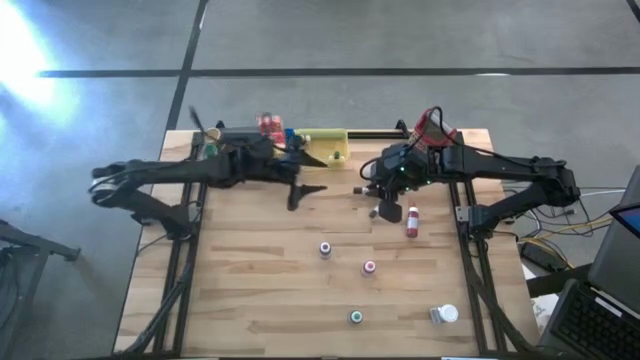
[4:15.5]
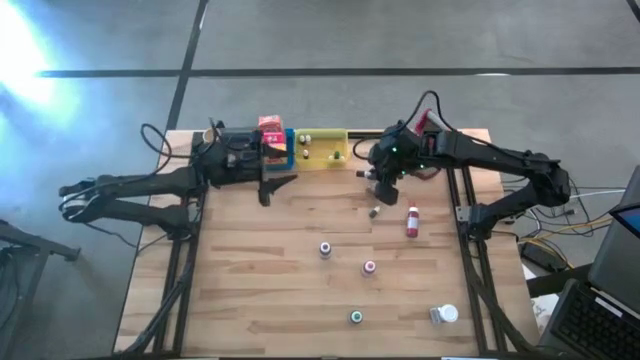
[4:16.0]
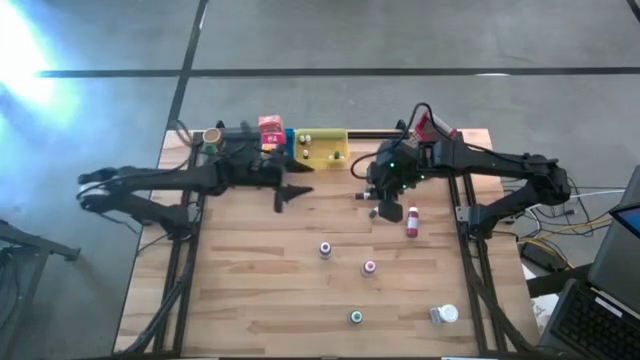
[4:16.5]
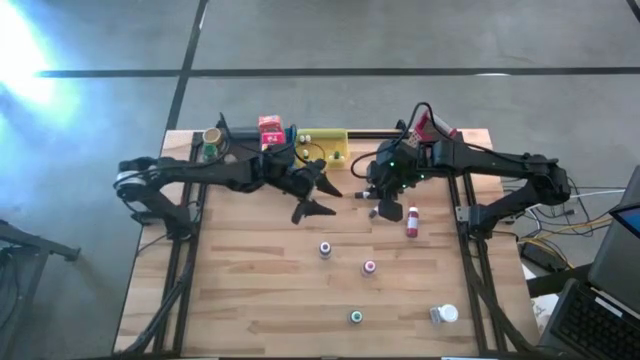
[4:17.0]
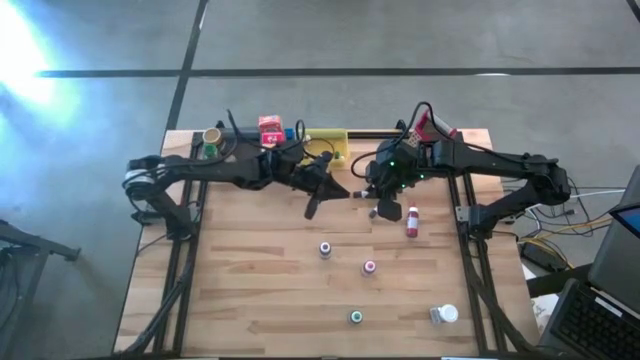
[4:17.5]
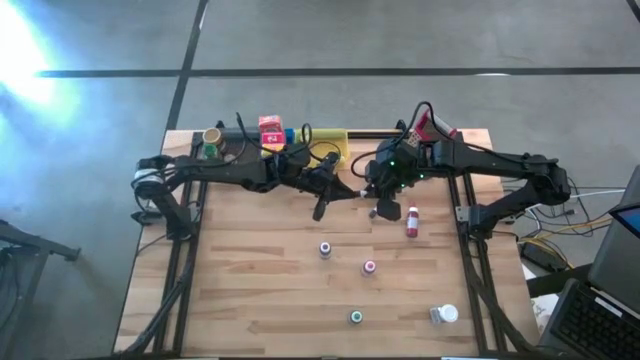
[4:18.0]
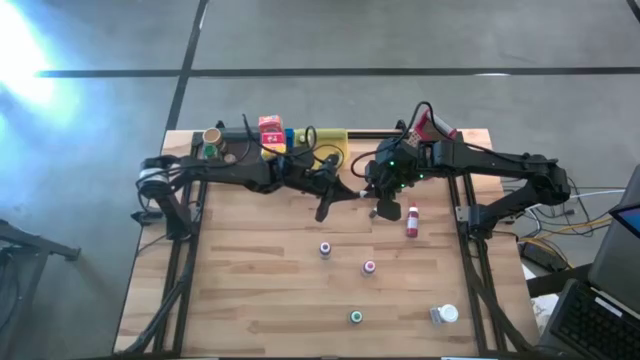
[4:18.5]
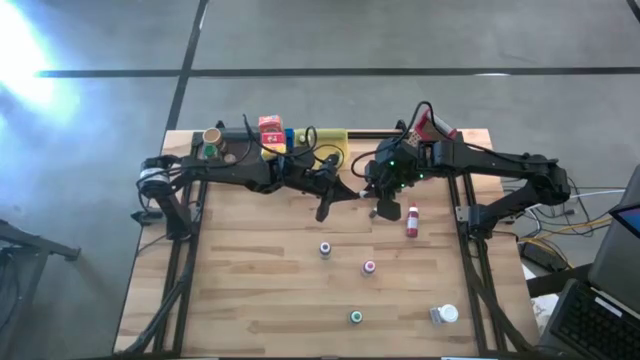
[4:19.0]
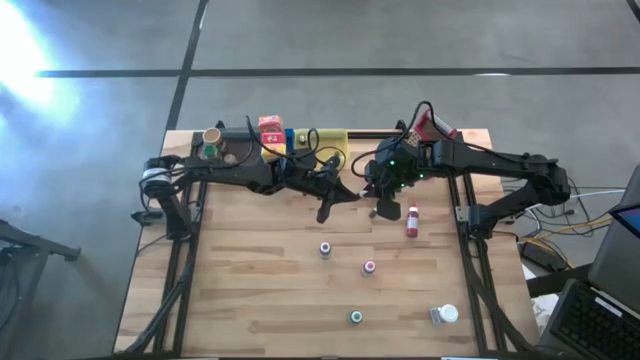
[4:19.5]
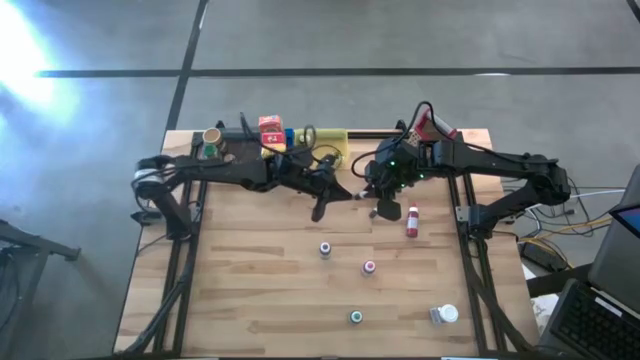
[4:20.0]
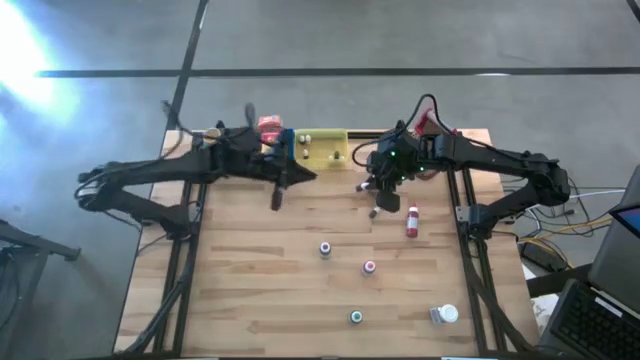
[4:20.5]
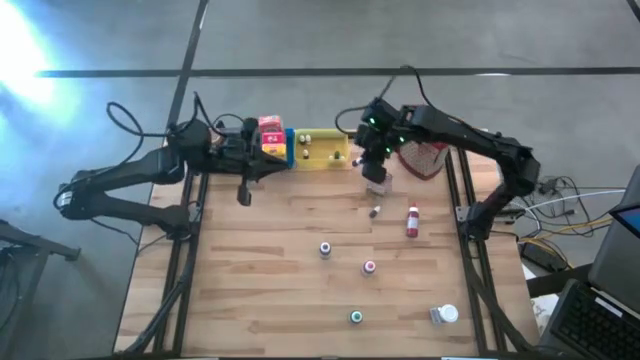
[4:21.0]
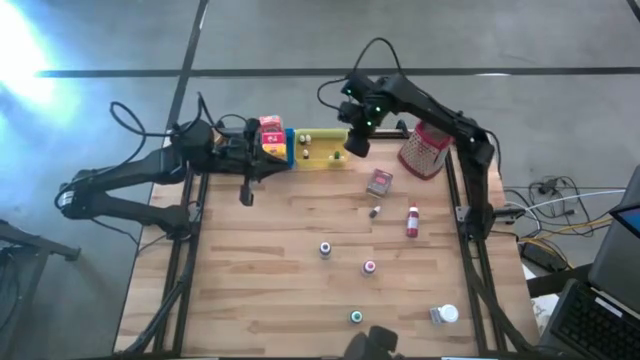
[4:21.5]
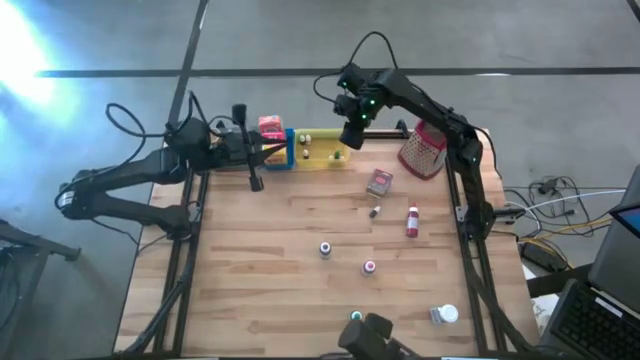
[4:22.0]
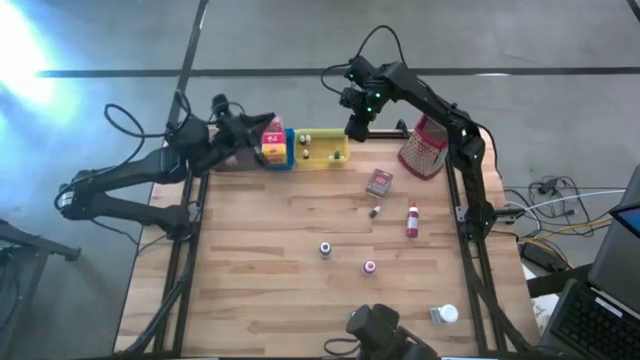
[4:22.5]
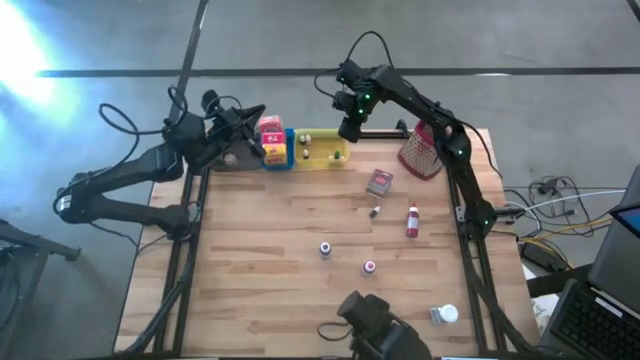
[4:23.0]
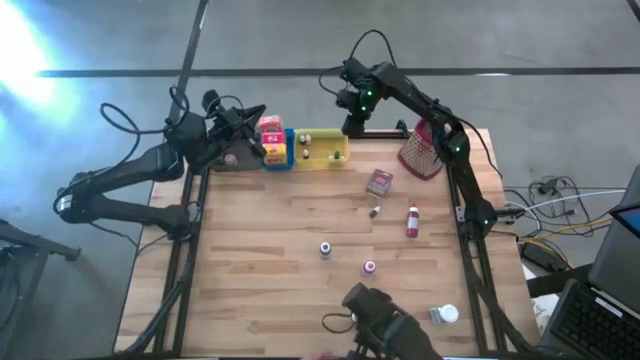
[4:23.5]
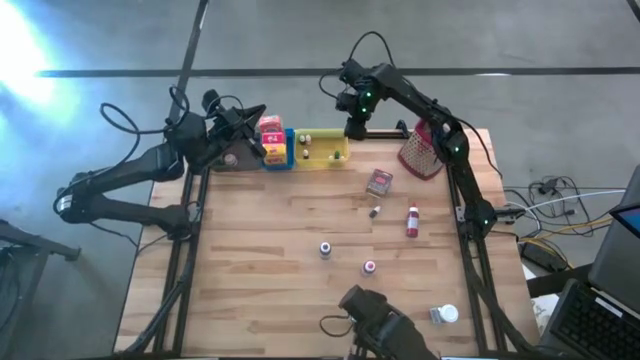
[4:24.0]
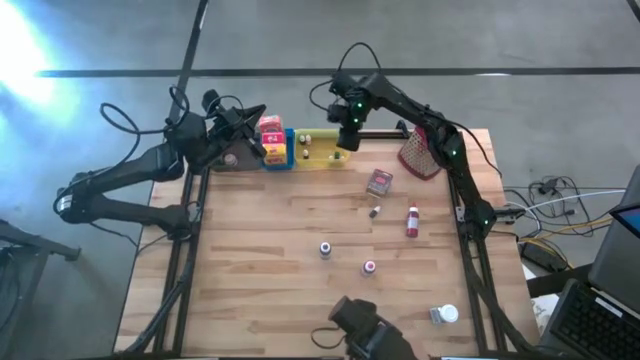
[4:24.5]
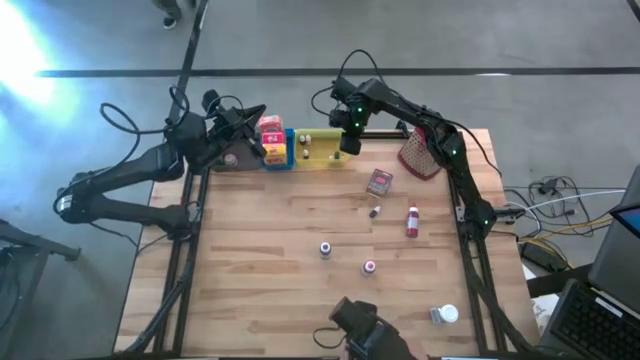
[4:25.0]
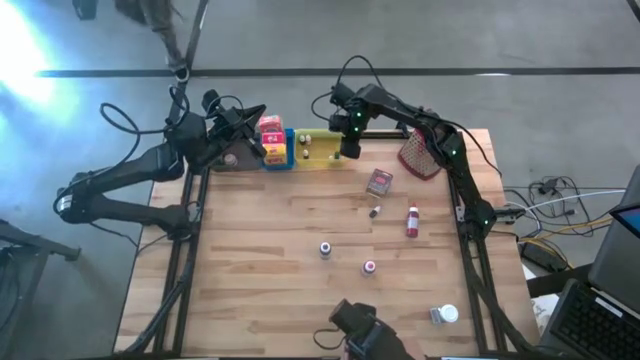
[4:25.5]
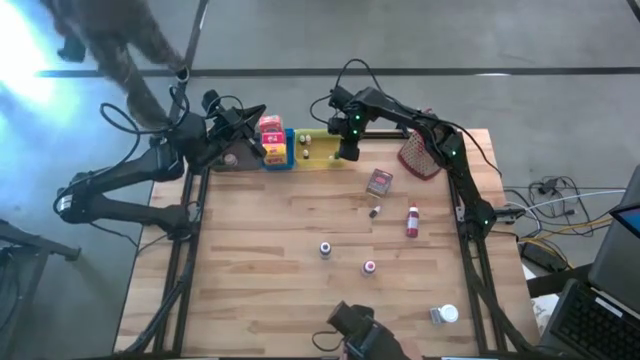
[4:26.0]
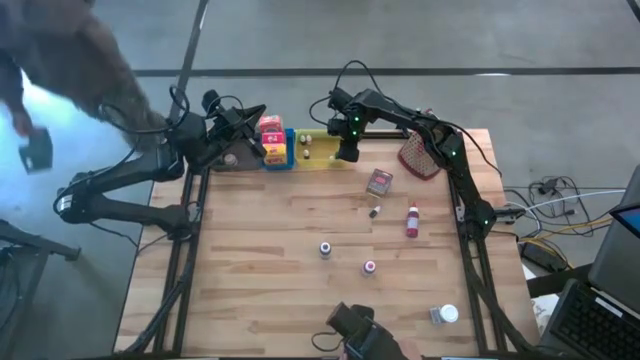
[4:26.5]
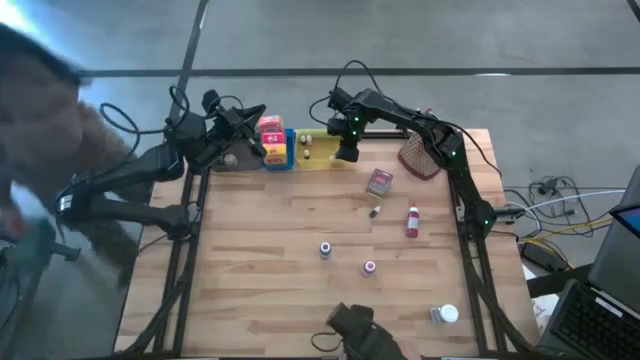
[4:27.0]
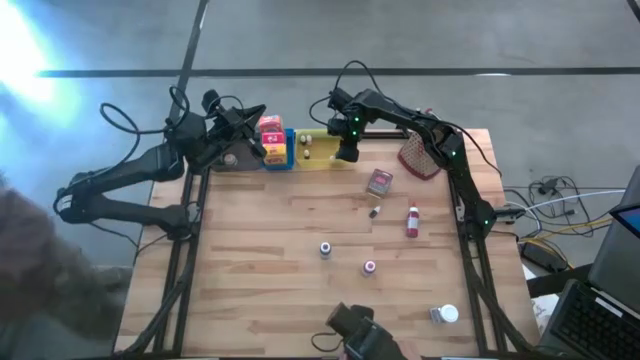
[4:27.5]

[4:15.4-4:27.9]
Task: Pick & Place Kitchen Items
Put the small violet food coloring bottle into the yellow bin

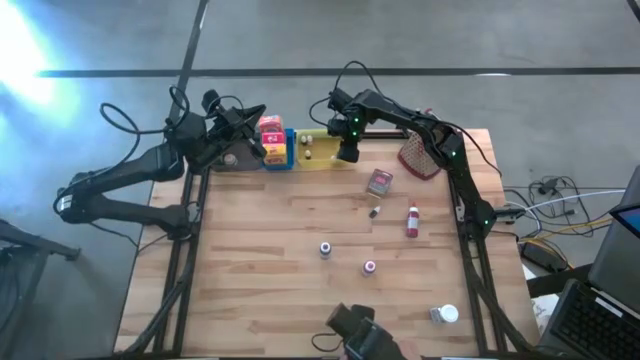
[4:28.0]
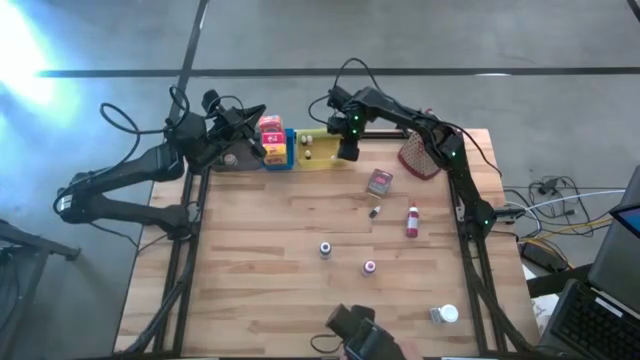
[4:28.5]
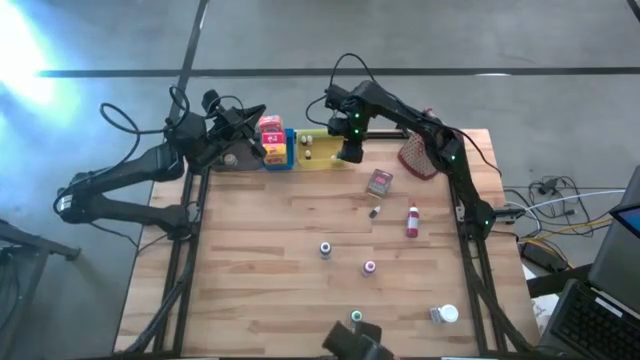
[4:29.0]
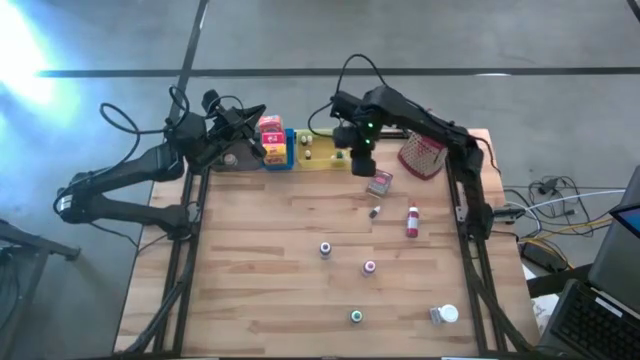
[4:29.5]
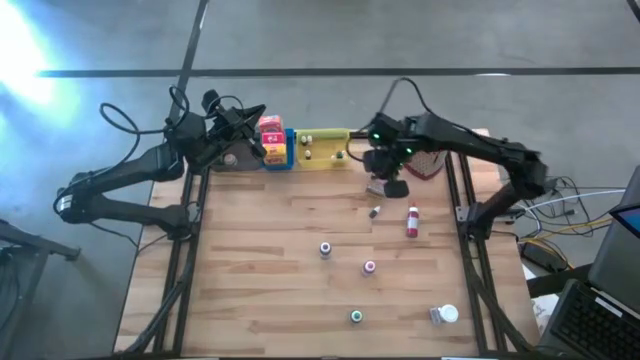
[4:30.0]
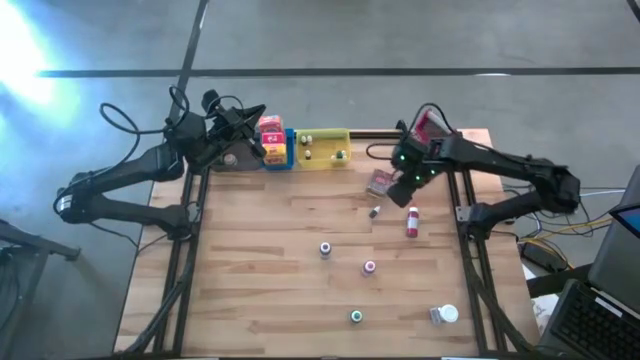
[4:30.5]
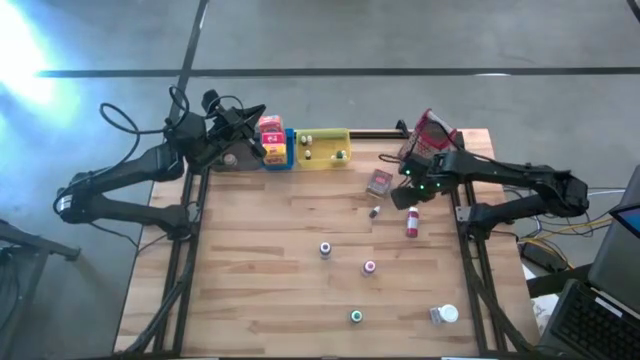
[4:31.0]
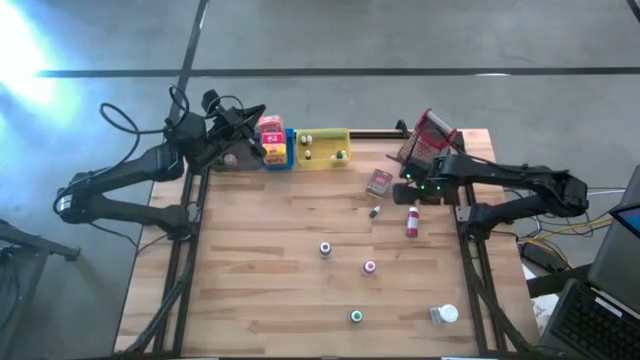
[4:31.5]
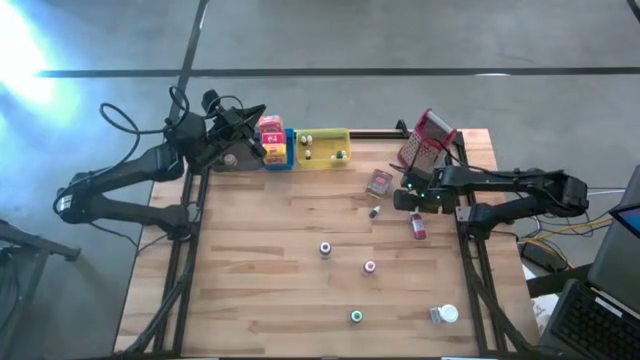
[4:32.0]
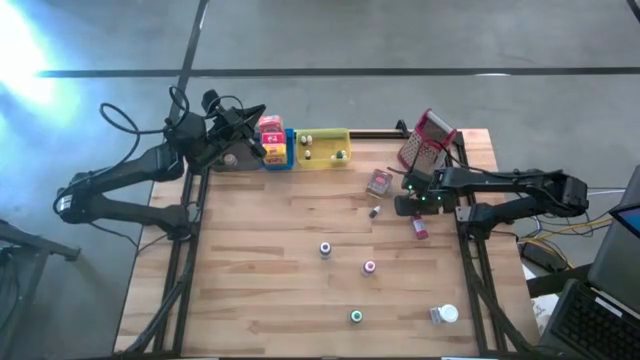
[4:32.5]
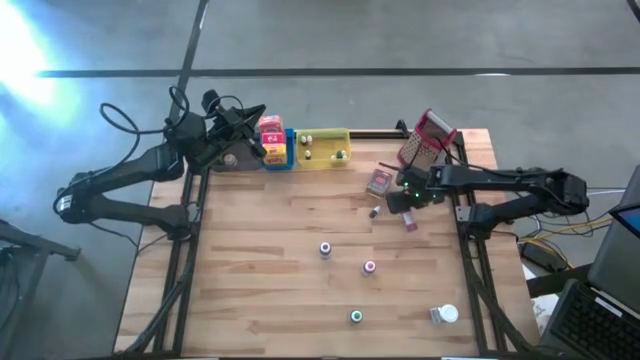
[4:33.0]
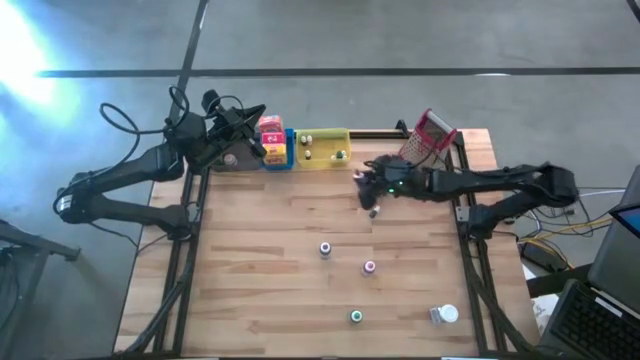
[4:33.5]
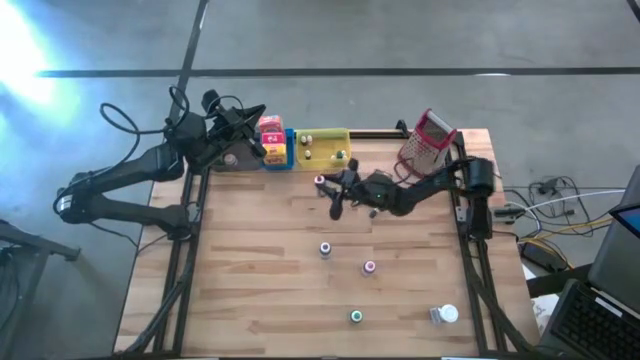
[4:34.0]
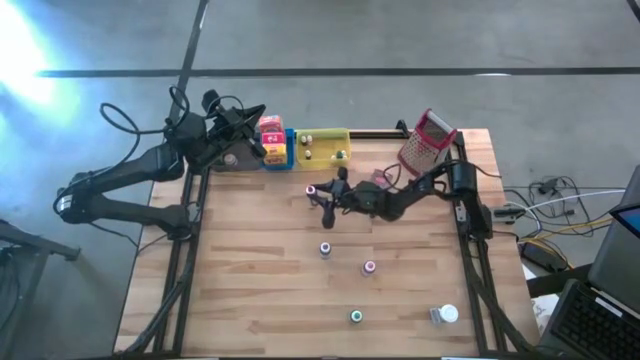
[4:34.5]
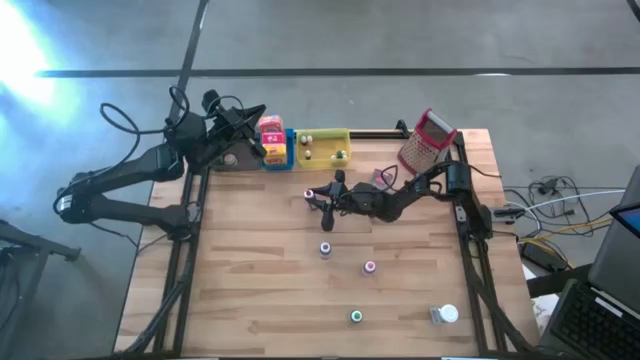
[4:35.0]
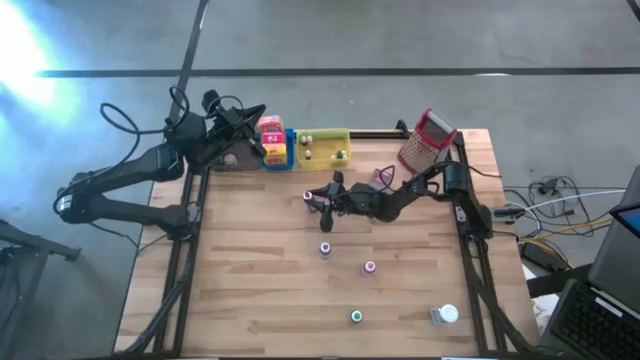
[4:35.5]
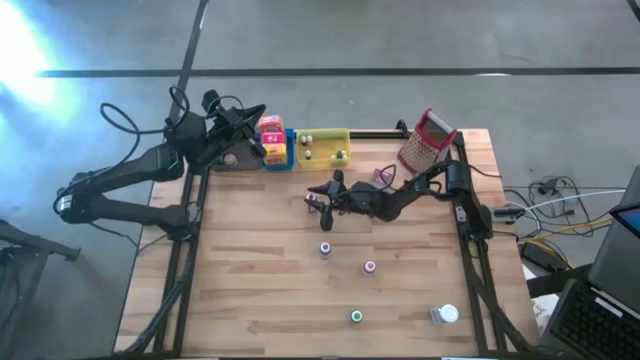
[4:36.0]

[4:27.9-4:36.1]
Move the red food coloring bottle to the center of the table

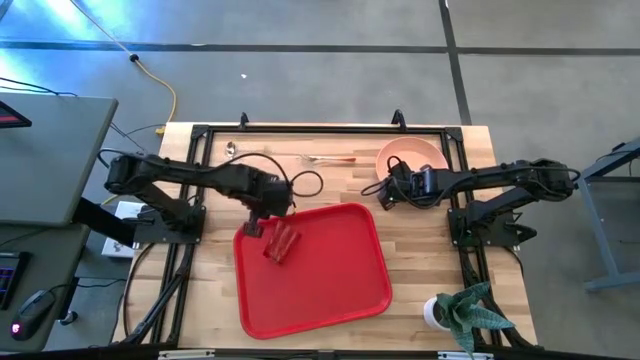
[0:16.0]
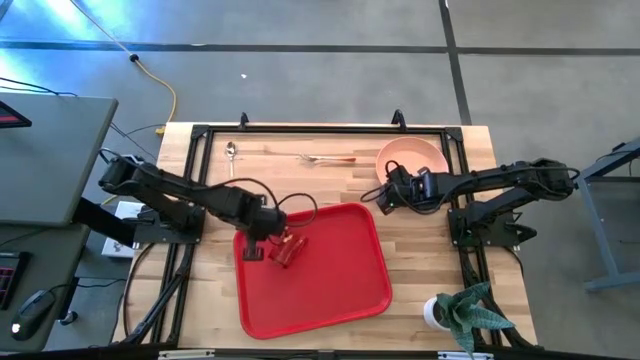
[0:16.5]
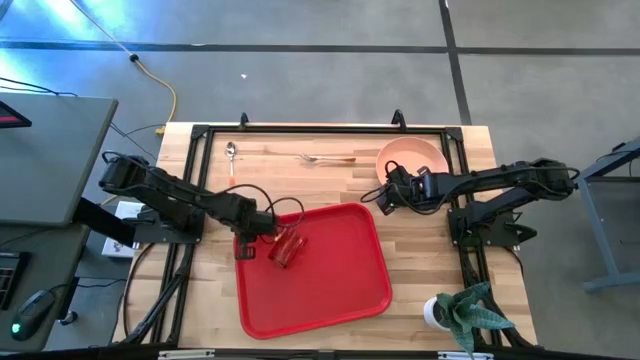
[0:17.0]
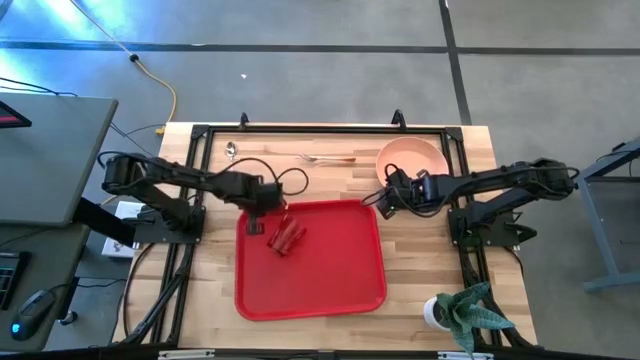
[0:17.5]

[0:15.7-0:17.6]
Task: Pick and place plate/cup/fork/spoon on tray
Adjust the red tray
